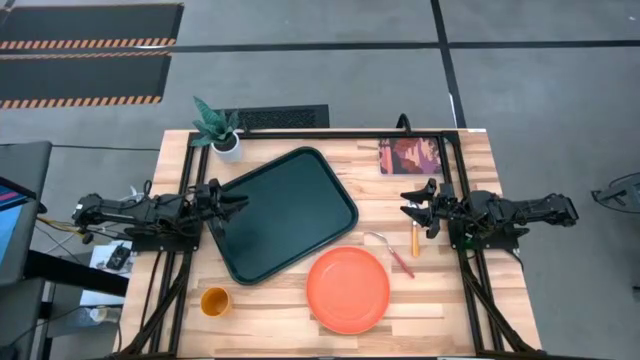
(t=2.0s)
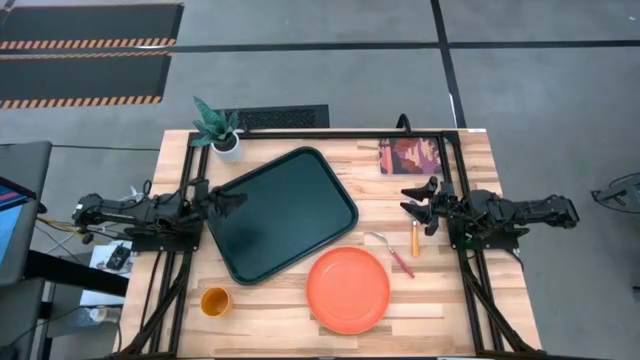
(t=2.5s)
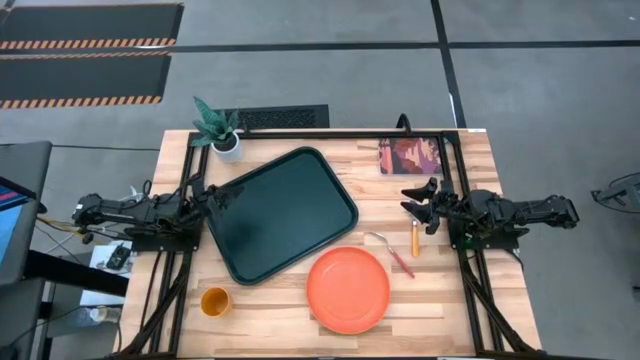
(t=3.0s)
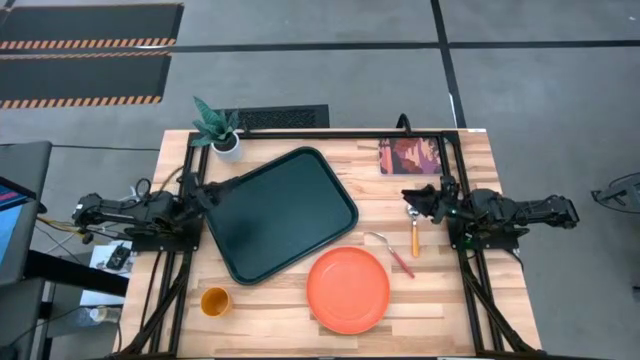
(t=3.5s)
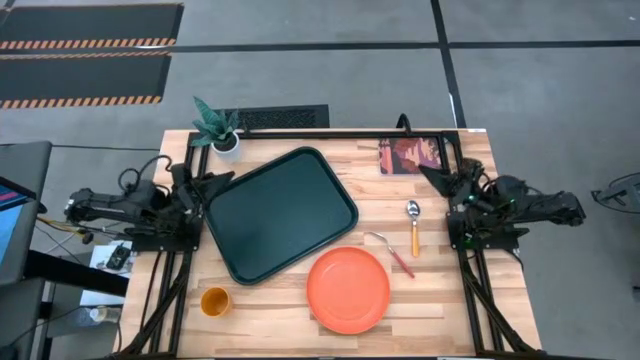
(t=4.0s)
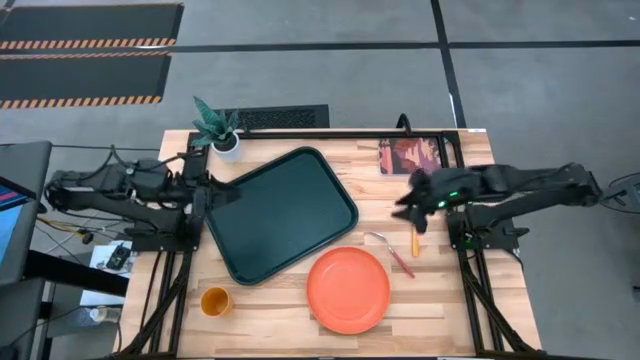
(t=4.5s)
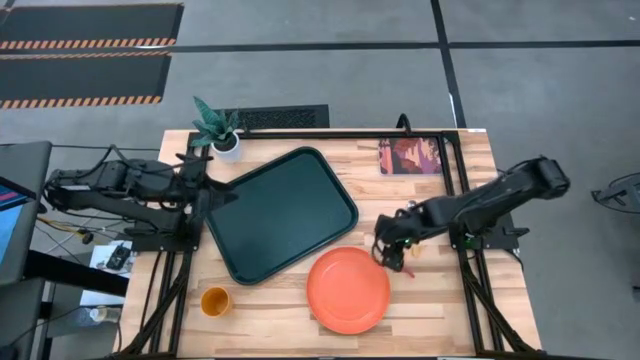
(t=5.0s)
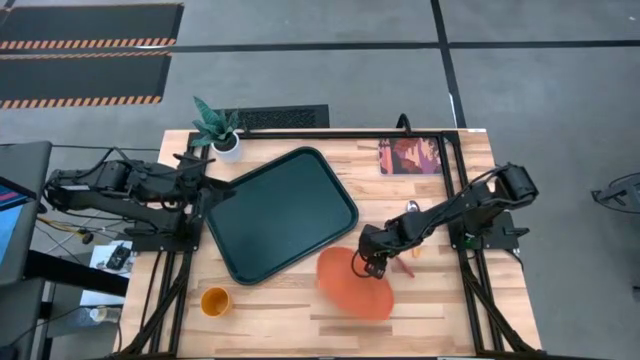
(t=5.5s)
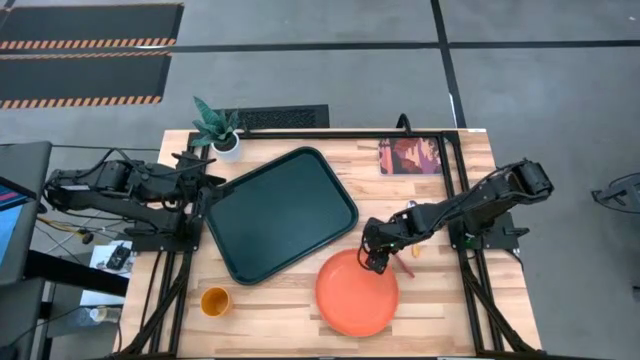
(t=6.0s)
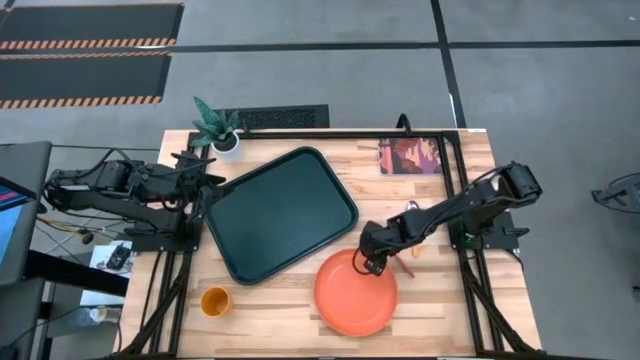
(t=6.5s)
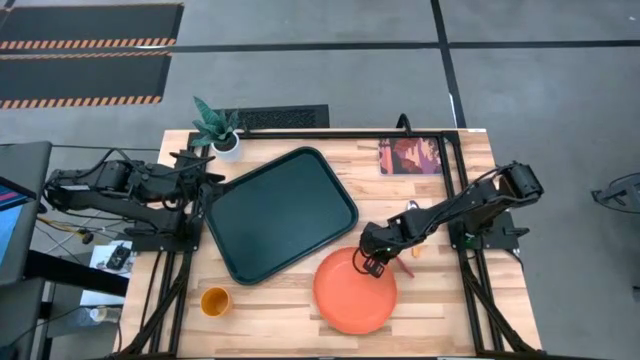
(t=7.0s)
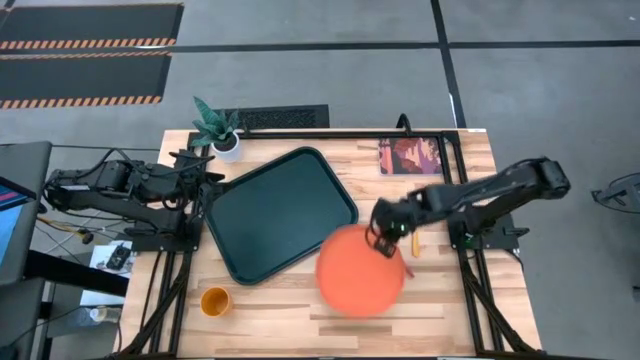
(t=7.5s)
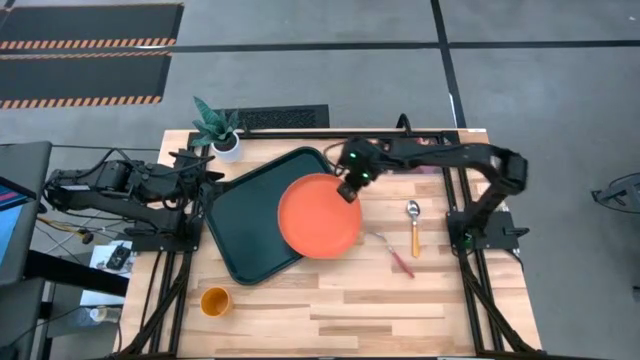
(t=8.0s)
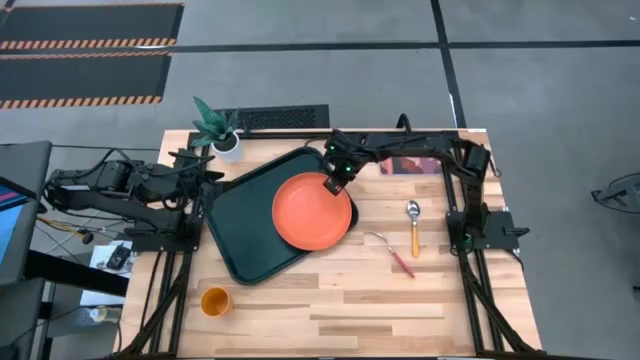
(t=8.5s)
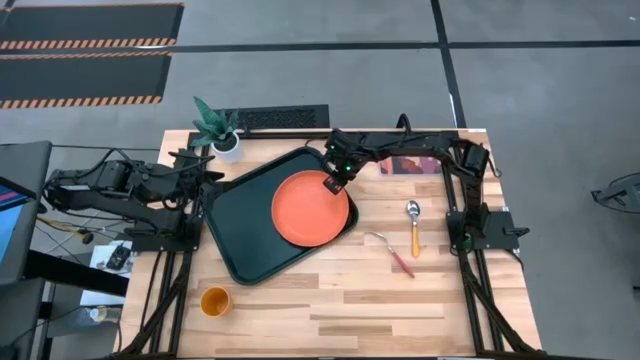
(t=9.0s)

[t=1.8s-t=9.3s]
Task: Pick and place plate/cup/fork/spoon on tray
Put the orange plate on the black tray

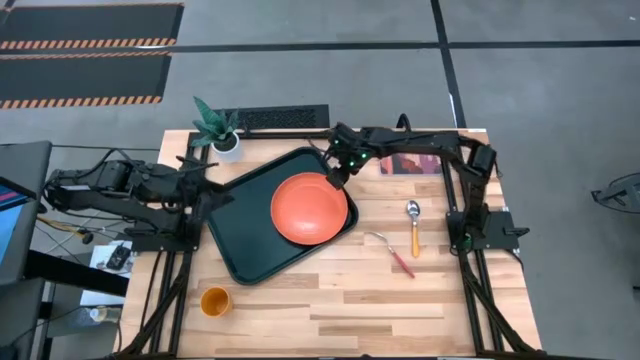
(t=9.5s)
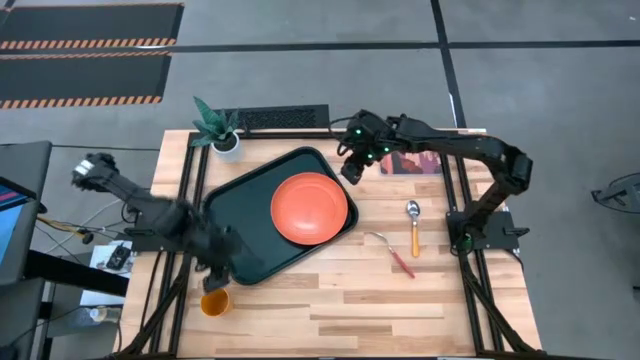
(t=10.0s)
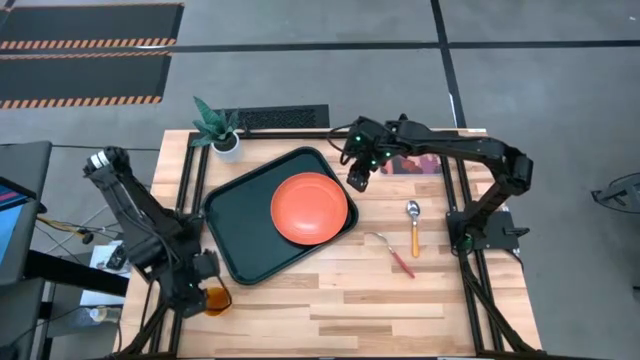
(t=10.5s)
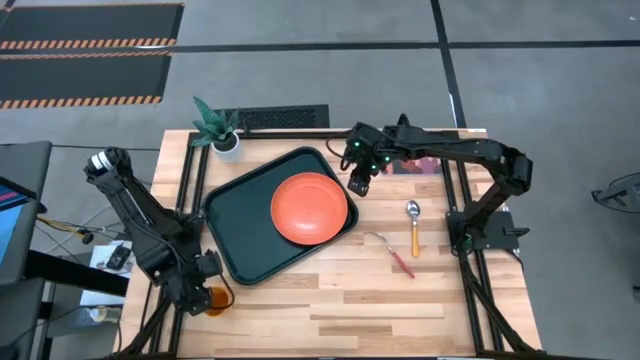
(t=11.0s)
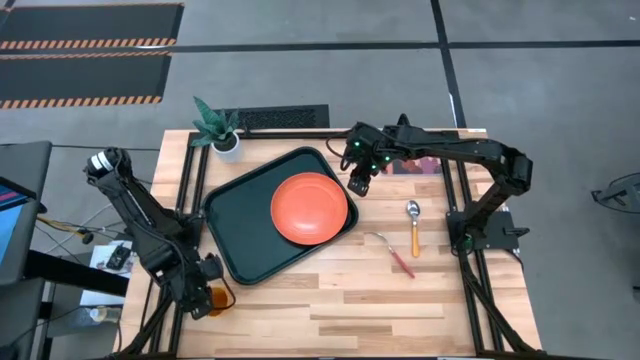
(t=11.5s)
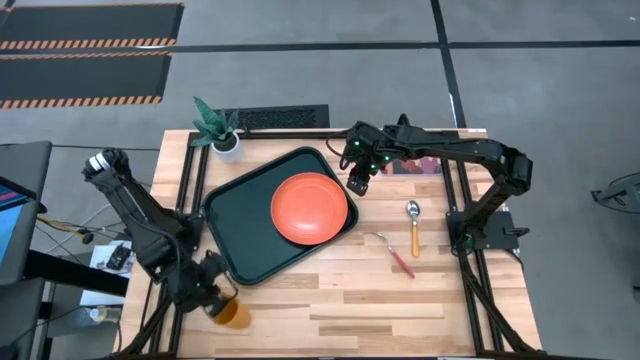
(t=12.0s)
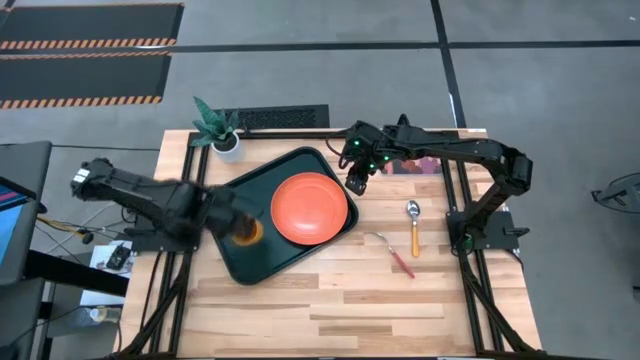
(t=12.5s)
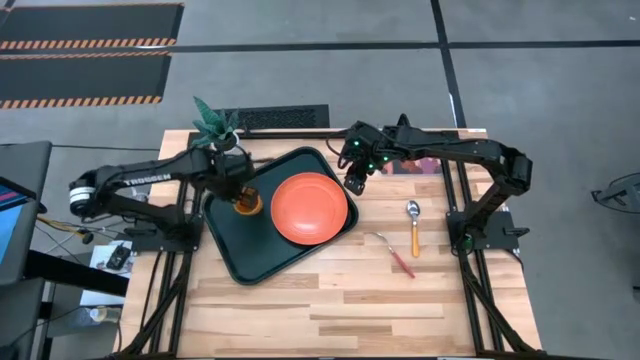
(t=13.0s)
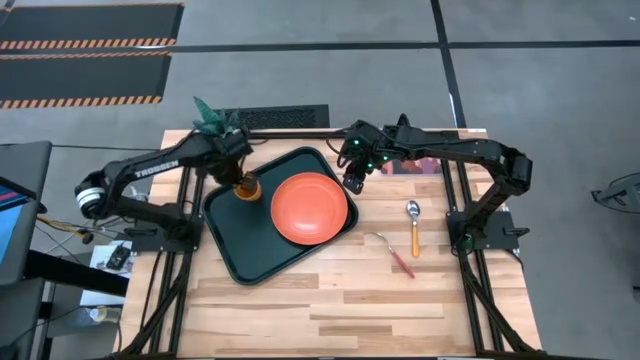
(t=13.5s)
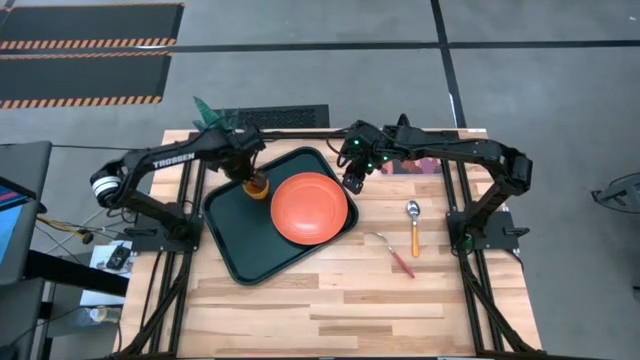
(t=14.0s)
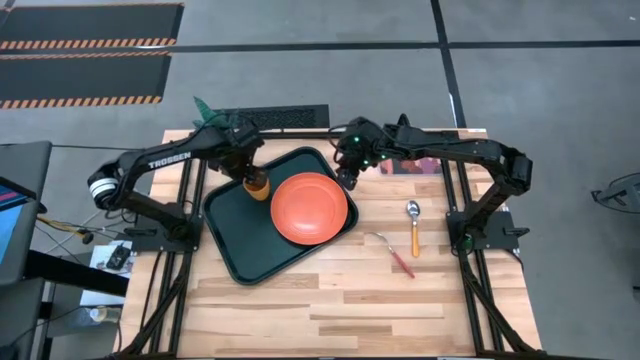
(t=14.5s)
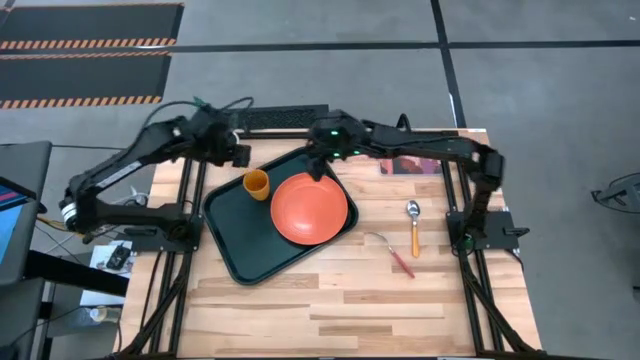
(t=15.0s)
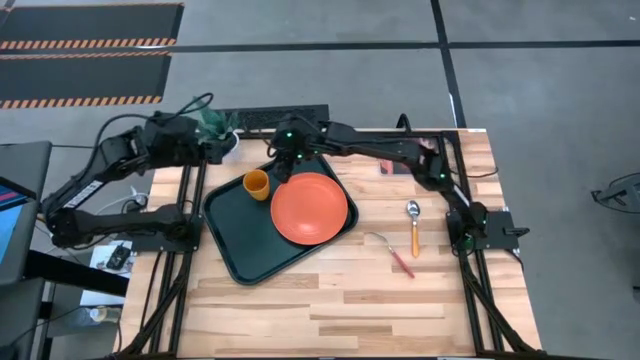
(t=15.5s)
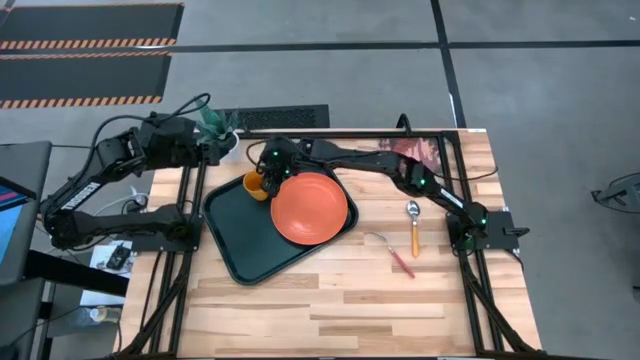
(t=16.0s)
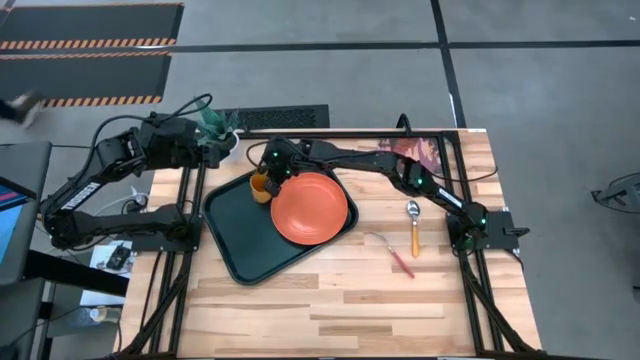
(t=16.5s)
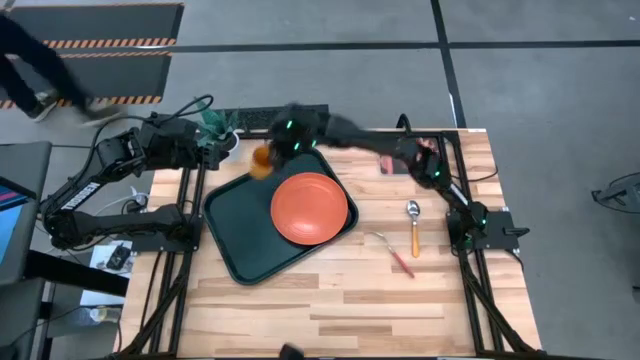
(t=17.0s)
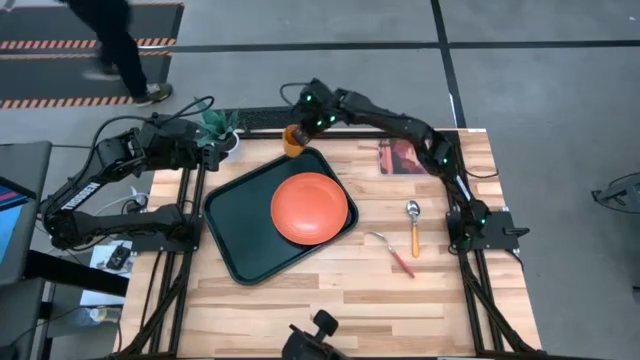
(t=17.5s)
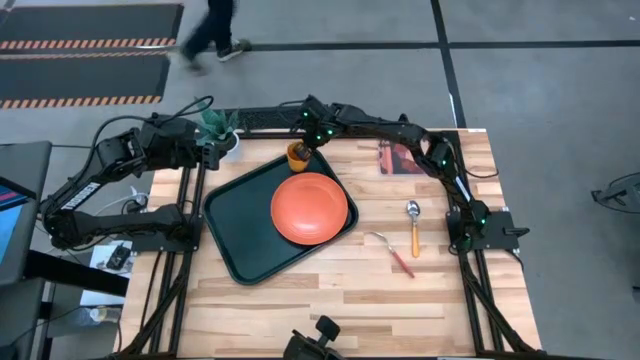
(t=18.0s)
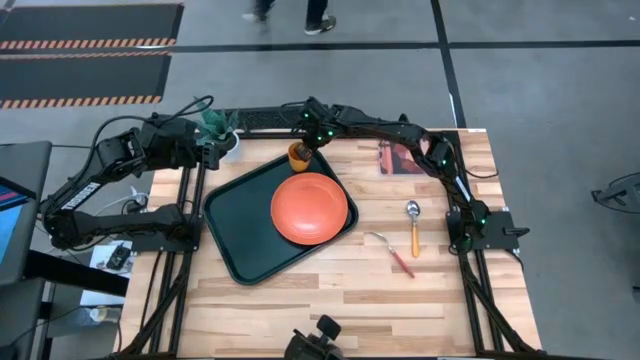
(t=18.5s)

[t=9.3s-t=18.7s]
Put the yellow cup on the black tray

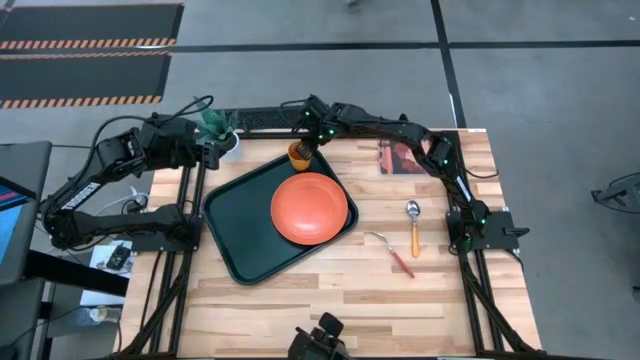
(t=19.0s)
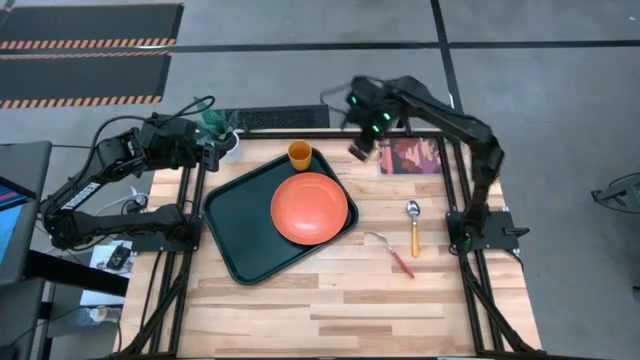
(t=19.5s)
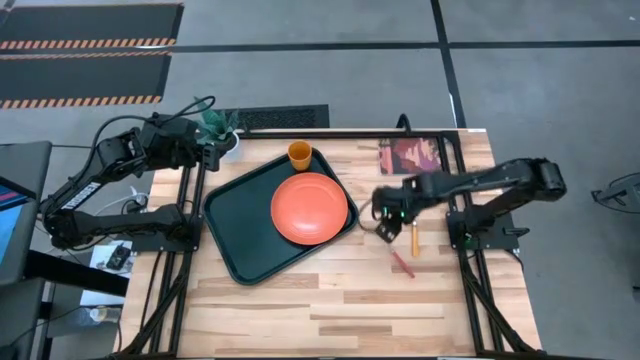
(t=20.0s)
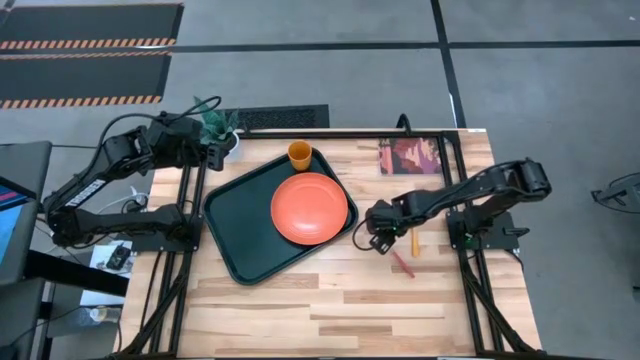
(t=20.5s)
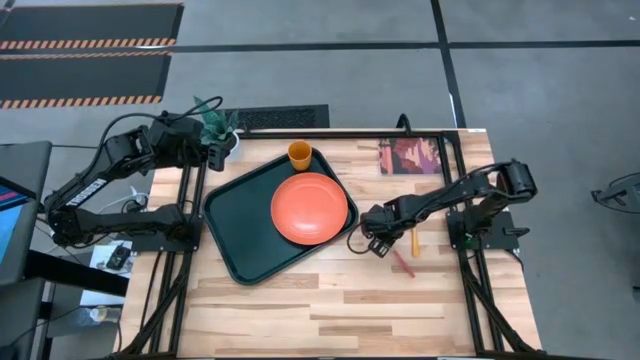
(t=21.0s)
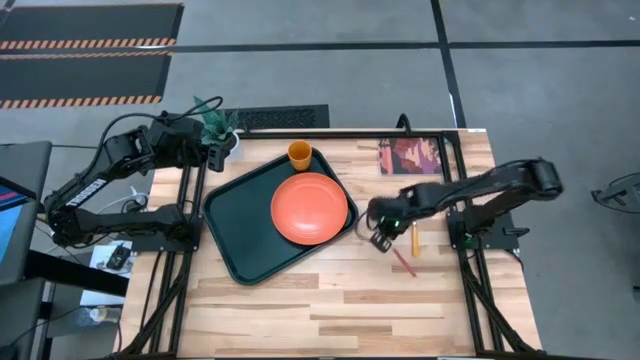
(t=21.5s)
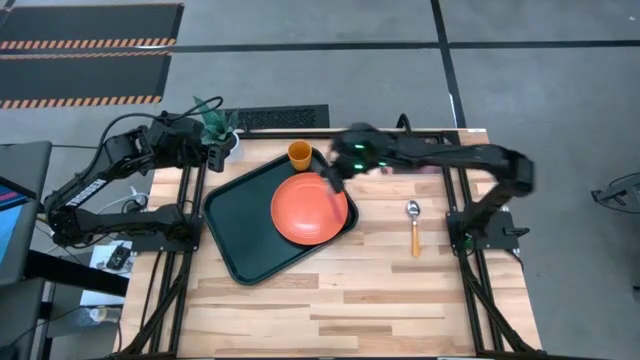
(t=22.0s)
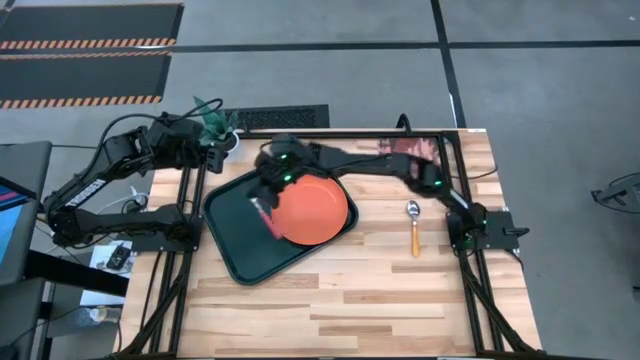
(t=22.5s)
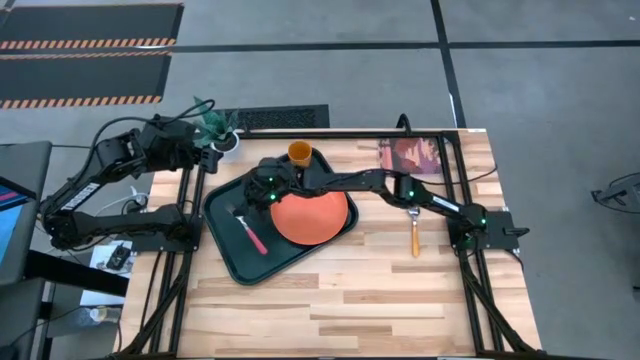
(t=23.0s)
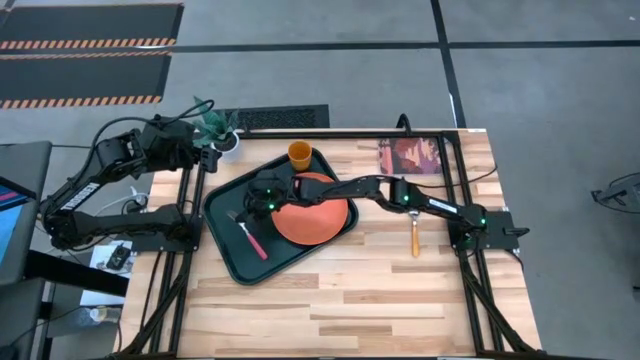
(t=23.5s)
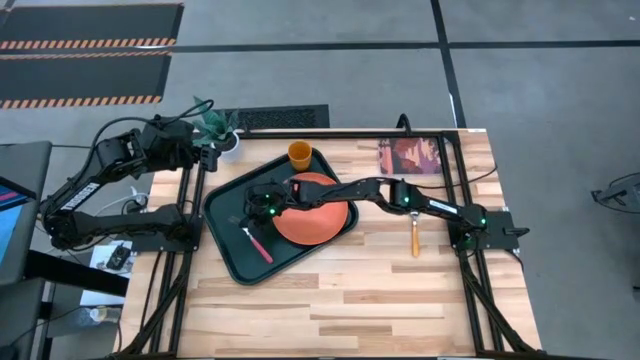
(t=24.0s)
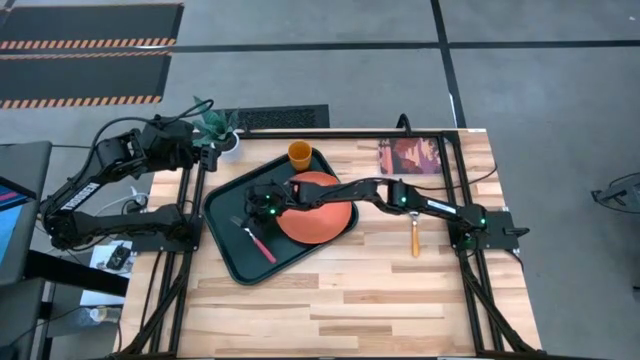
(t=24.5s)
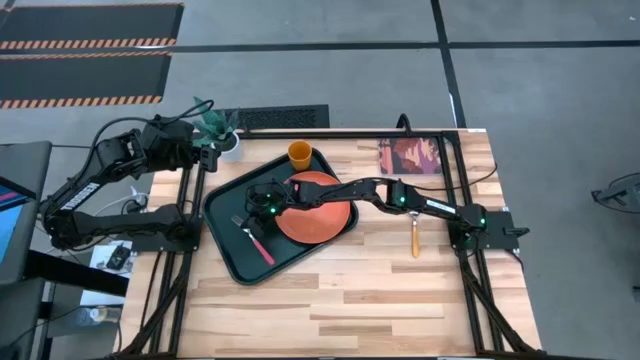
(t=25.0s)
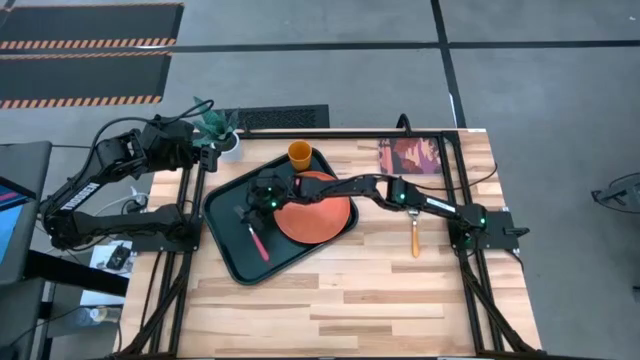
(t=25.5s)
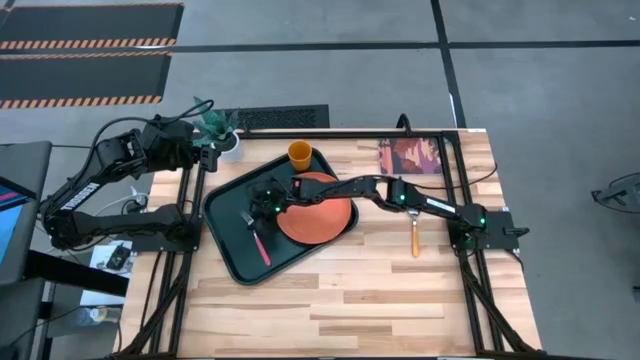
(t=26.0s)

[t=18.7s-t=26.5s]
Put the pink fork on the black tray
